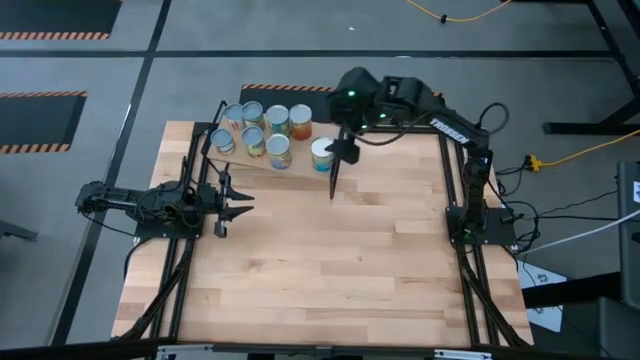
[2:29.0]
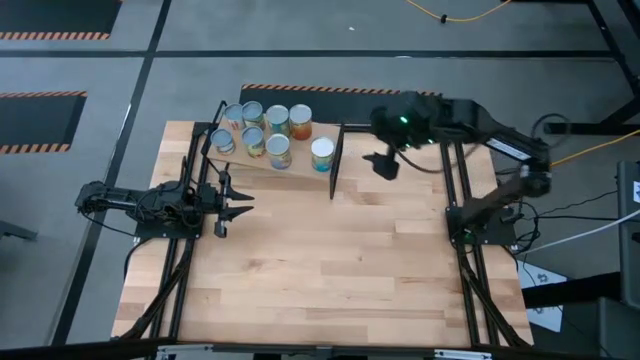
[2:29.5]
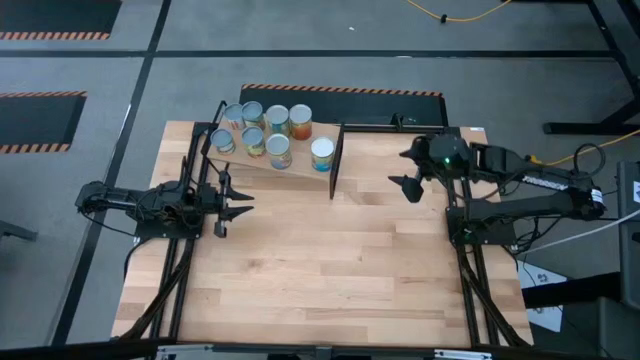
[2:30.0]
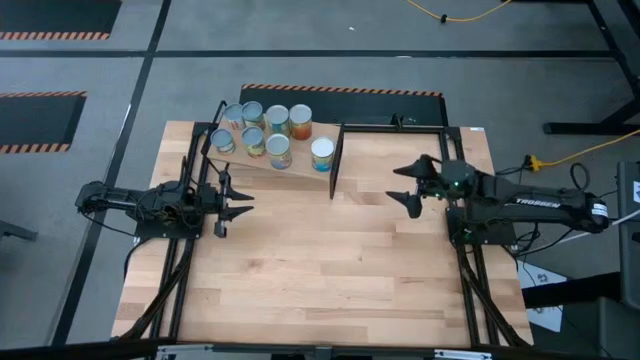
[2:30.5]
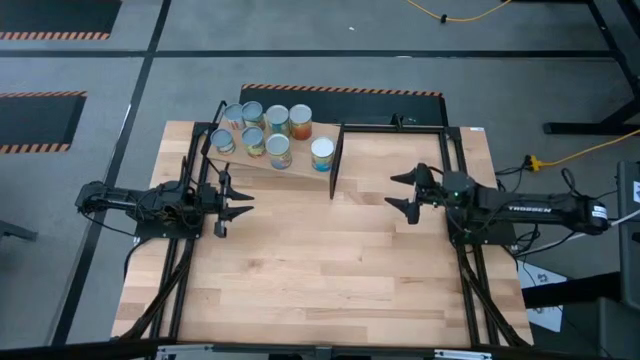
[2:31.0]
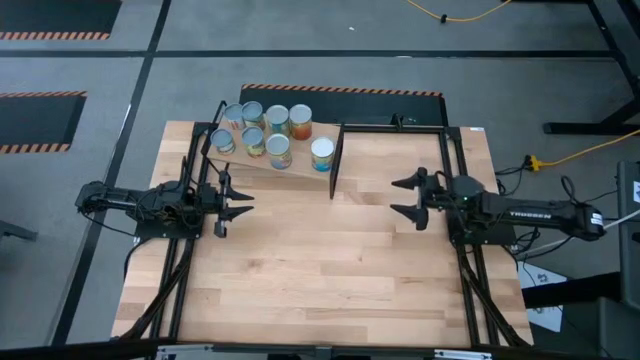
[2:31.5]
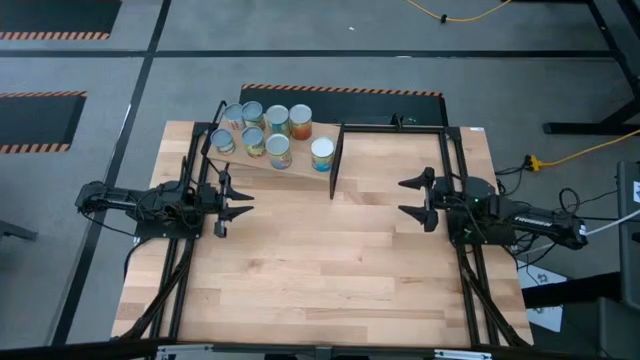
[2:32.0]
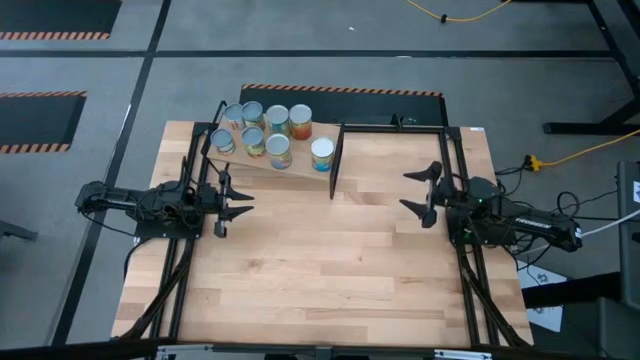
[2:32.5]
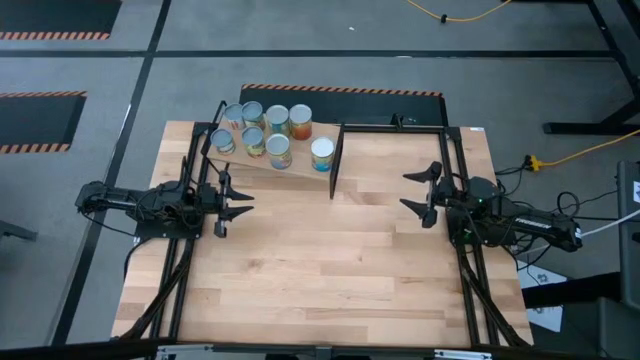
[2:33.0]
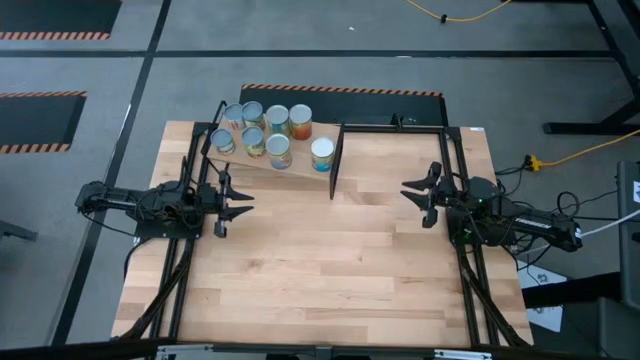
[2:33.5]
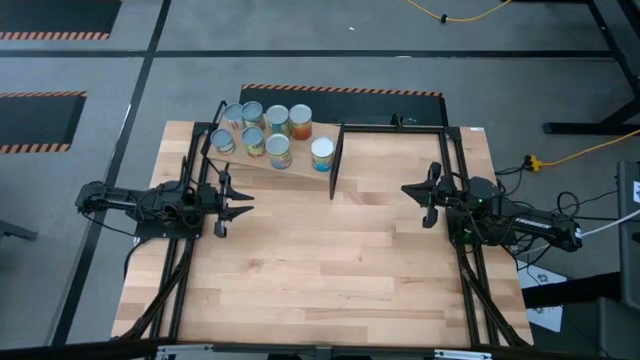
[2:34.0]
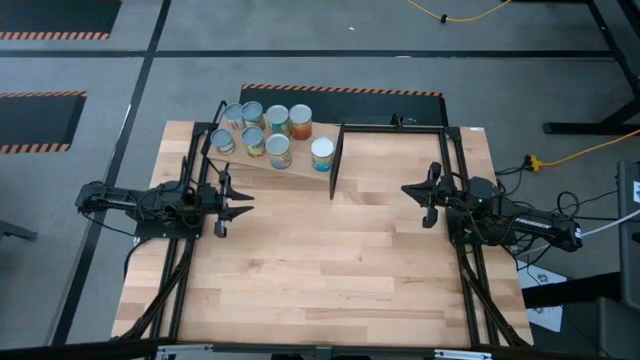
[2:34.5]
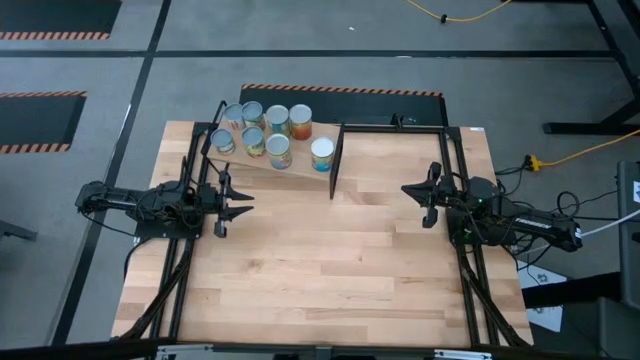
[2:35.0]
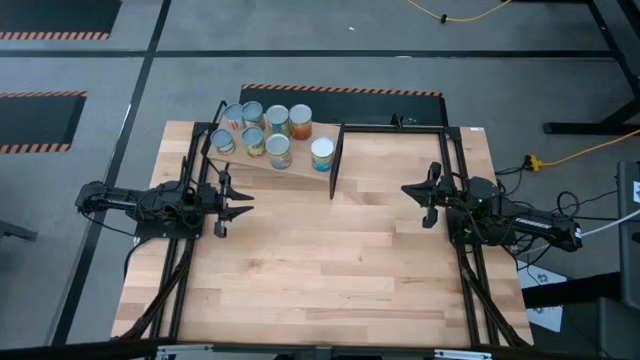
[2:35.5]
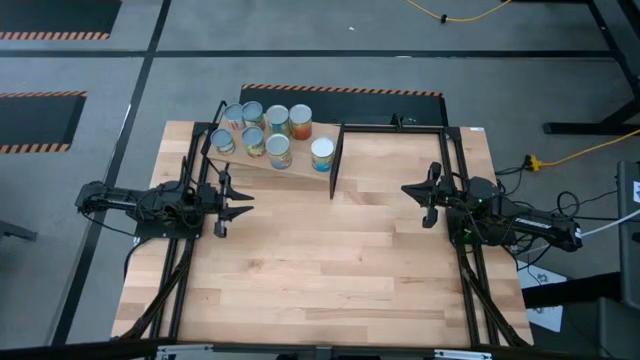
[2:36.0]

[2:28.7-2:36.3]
Task: Pick and place cans onto a shelf
Return to Home Position

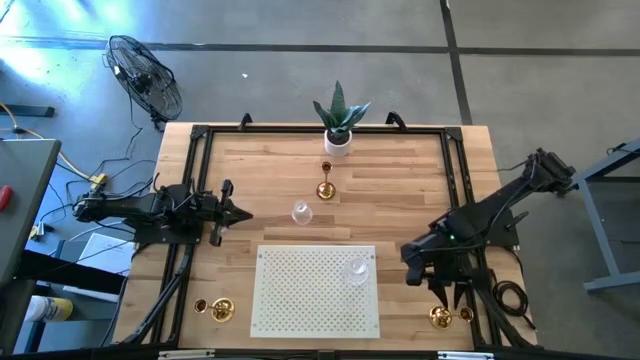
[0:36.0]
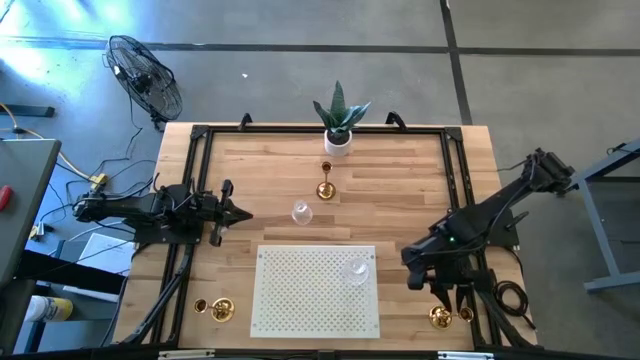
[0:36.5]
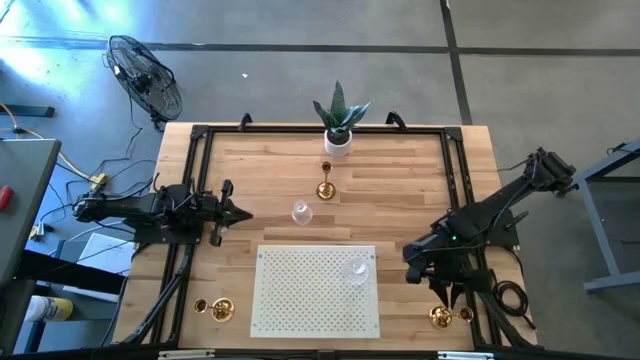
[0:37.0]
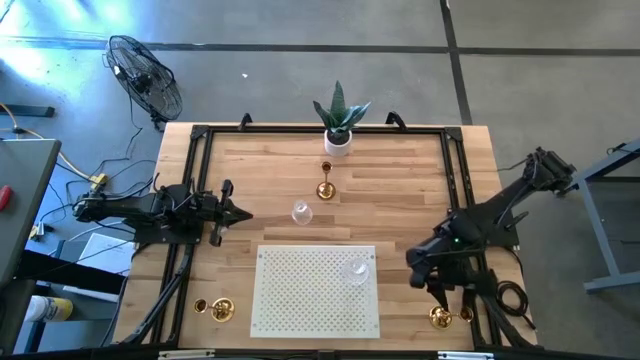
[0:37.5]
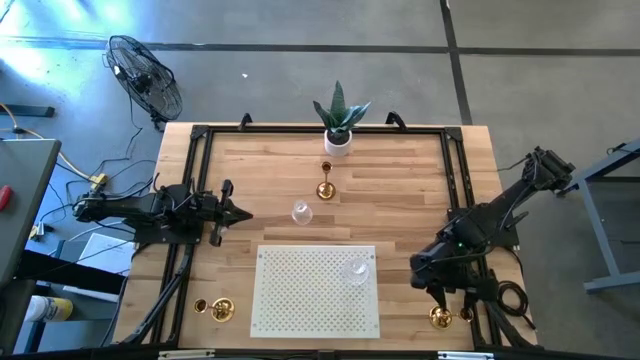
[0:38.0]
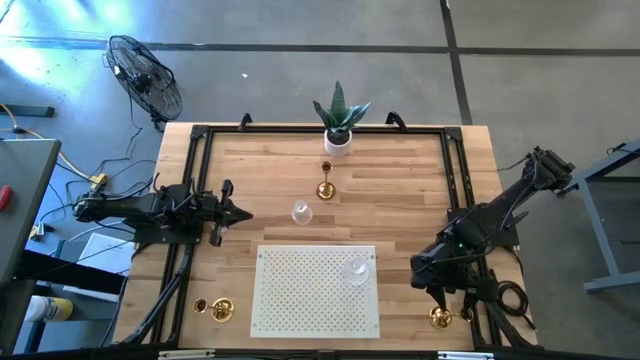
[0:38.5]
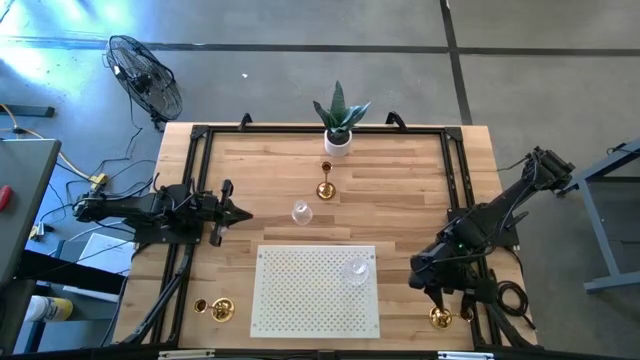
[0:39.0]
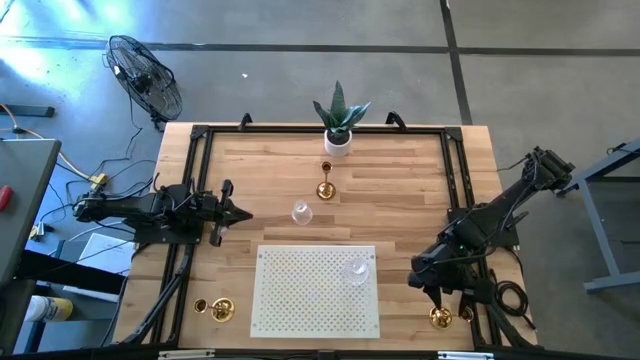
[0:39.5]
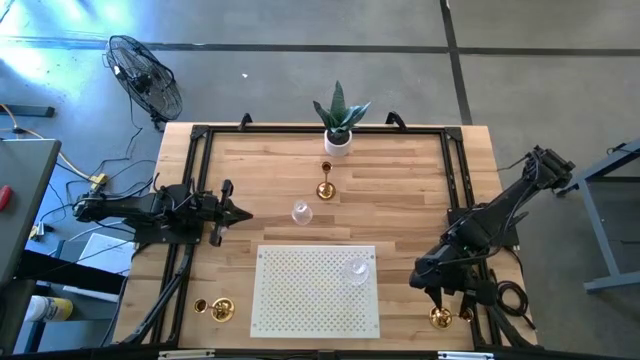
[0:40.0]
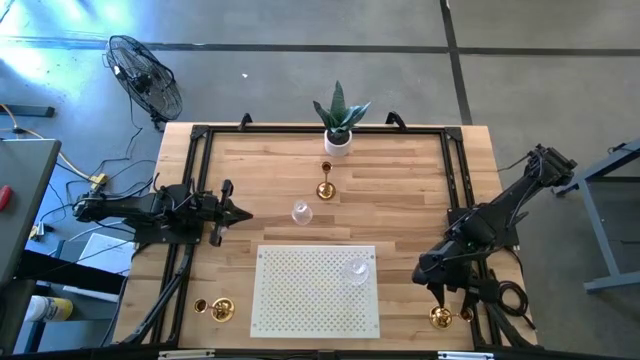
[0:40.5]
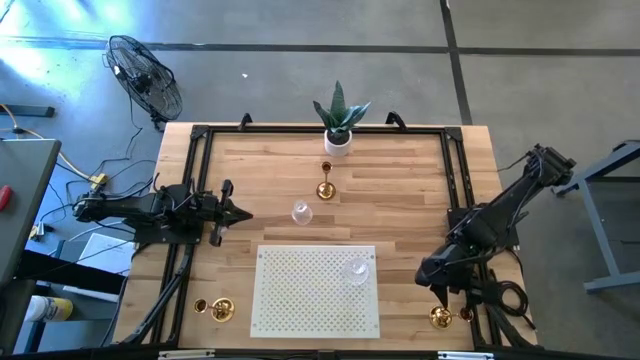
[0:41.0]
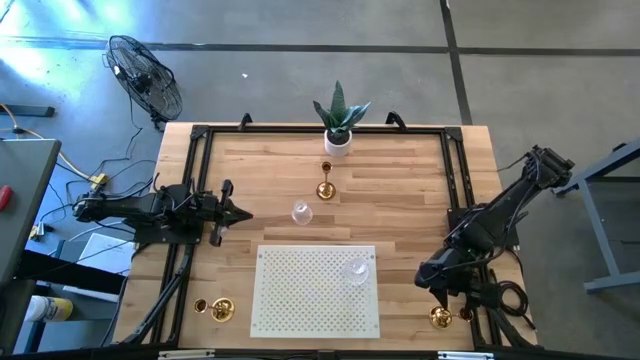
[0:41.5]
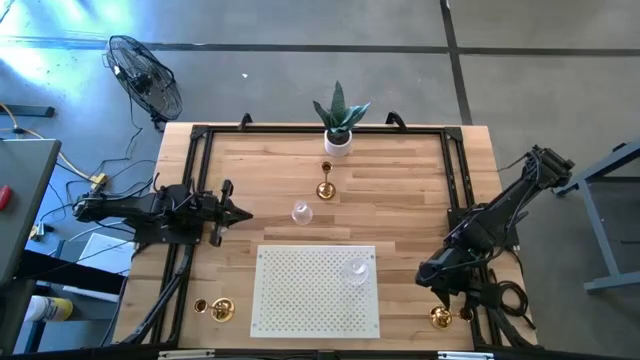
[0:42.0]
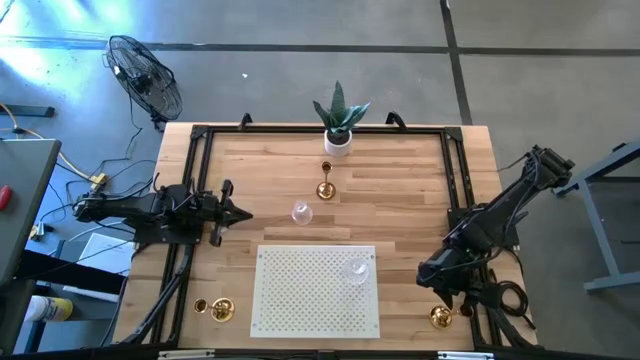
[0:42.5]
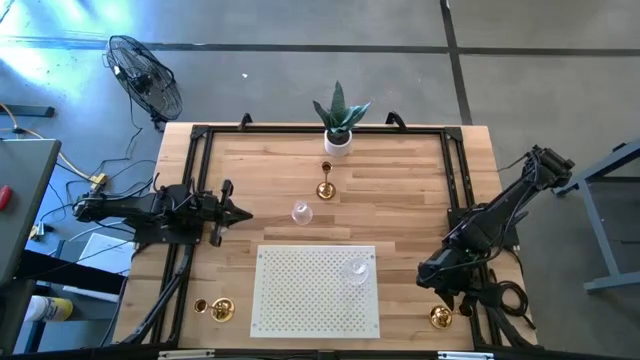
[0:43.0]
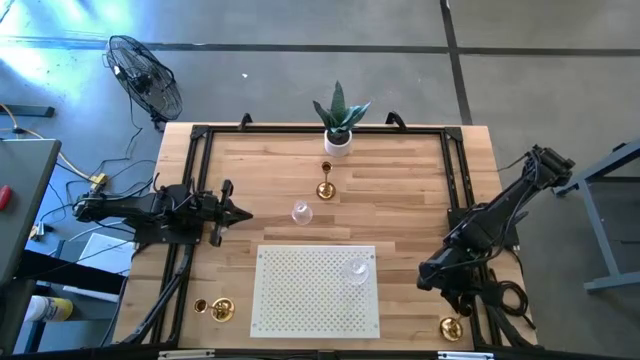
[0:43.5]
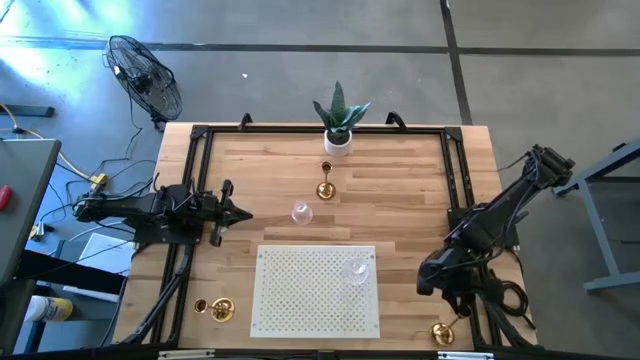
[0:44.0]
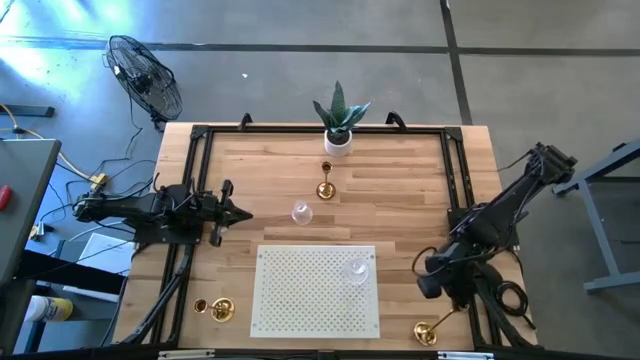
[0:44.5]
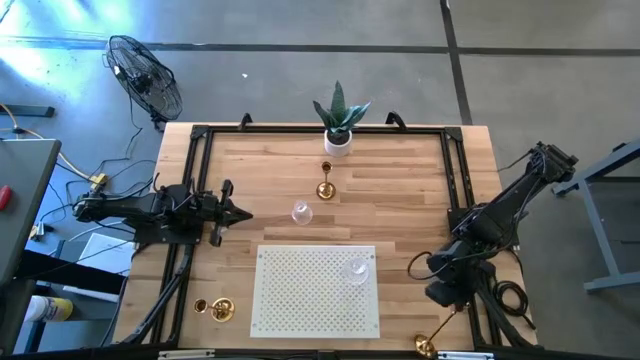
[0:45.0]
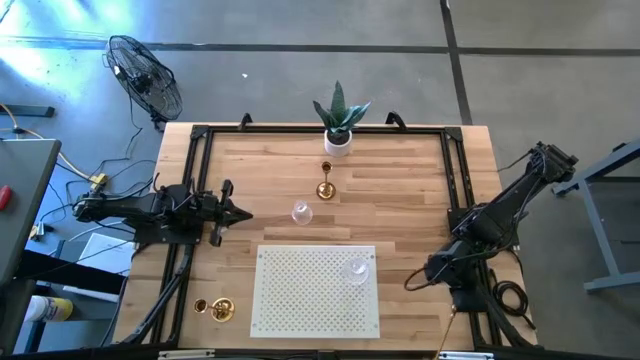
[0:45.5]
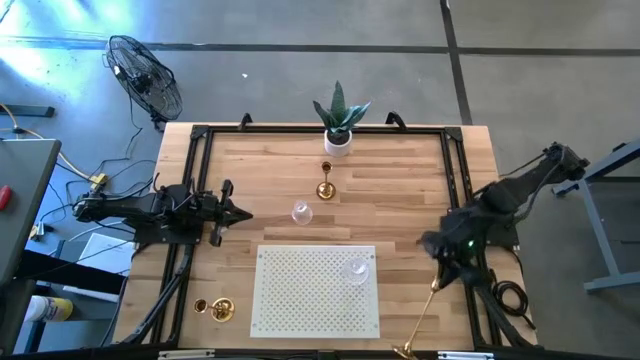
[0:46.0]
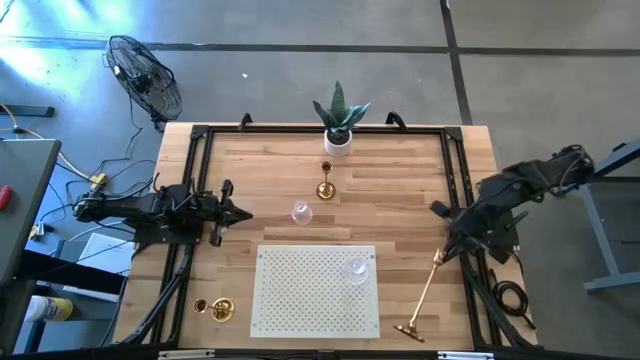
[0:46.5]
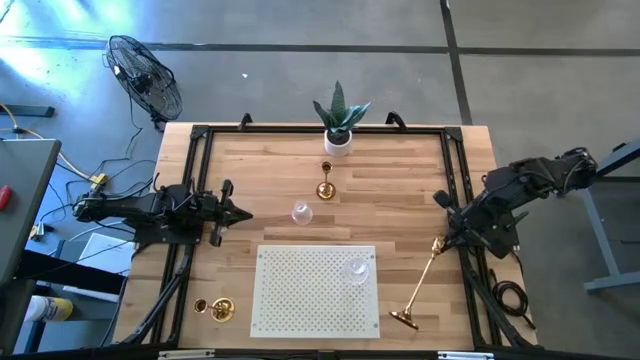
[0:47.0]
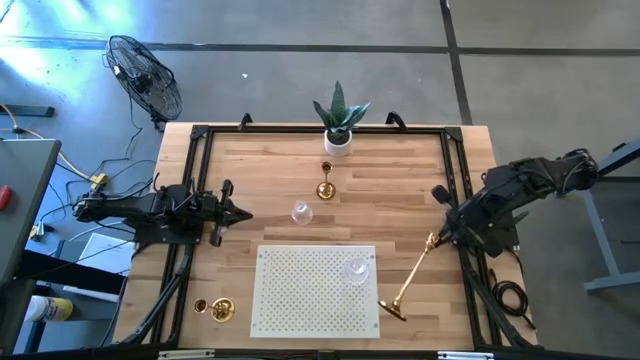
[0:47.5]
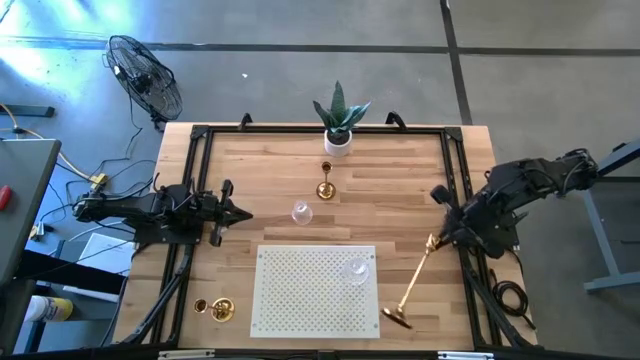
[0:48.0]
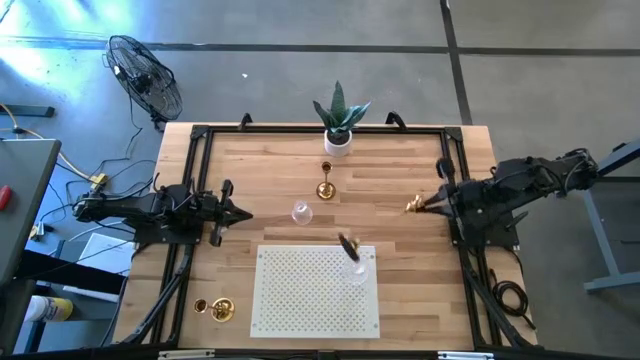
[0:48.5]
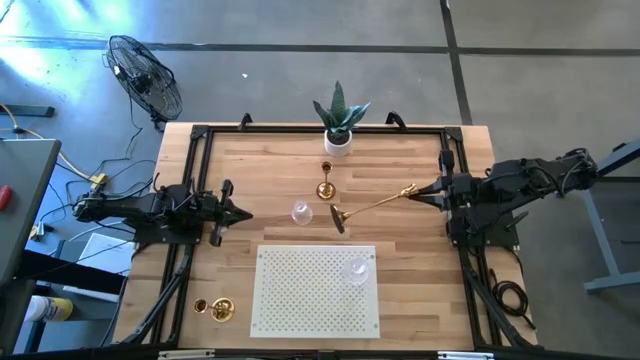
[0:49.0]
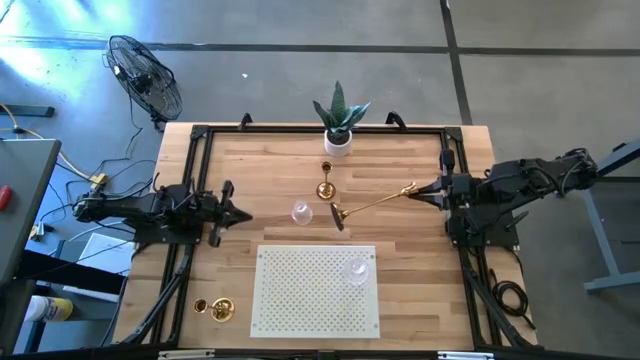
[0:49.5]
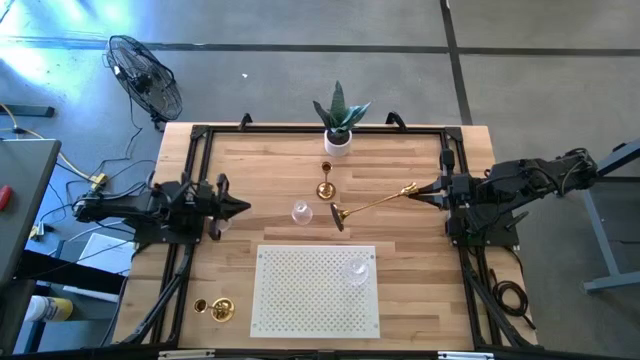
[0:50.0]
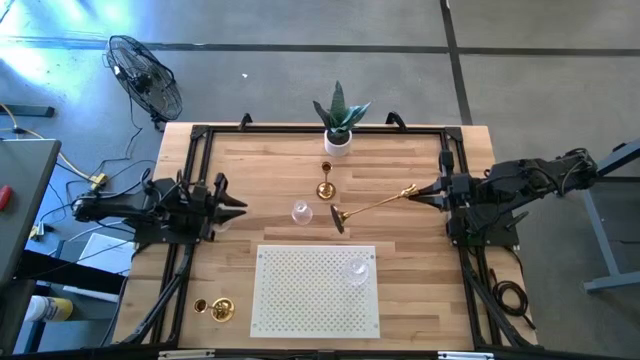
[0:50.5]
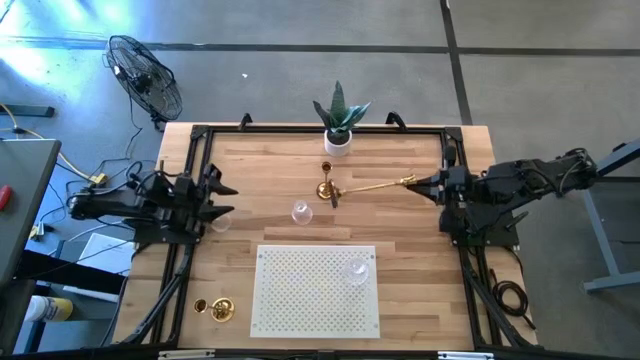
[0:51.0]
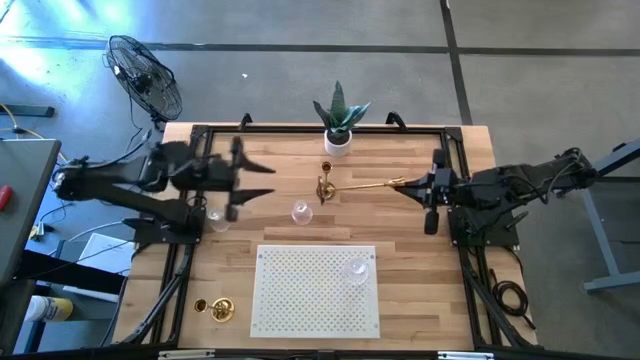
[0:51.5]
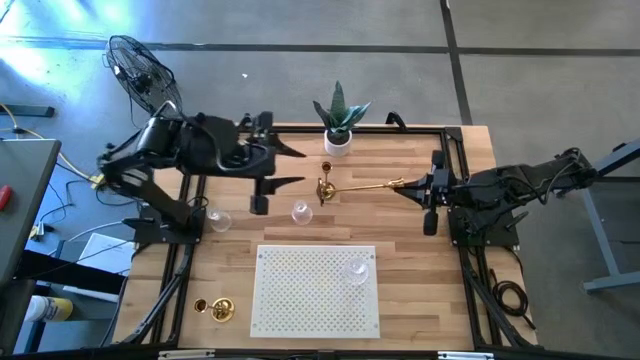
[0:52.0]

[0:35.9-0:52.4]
Task: Pick & Place candle stick holders
Put the bottom right gold candle holder on the shelf
